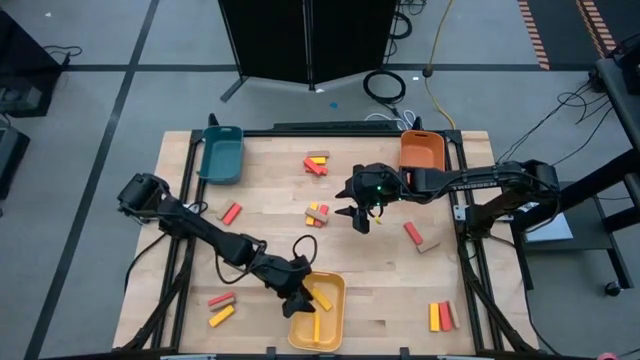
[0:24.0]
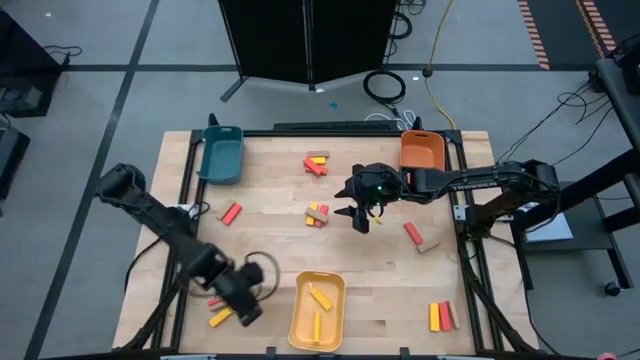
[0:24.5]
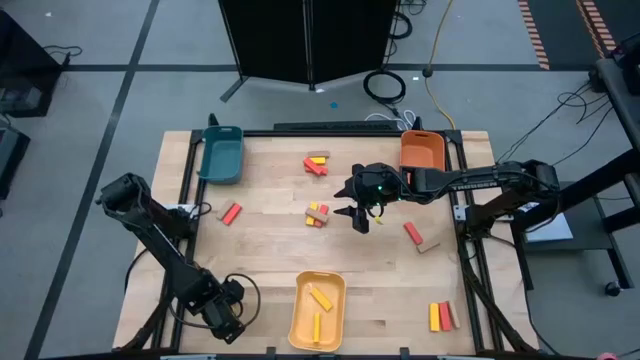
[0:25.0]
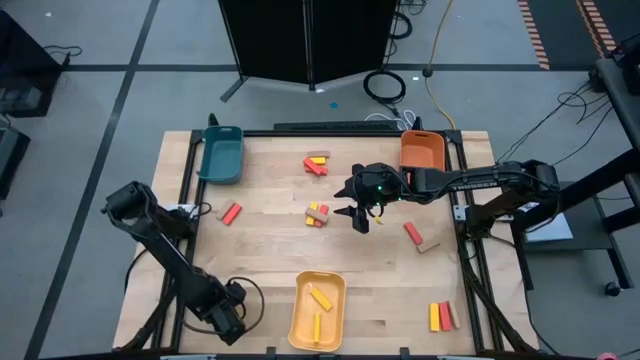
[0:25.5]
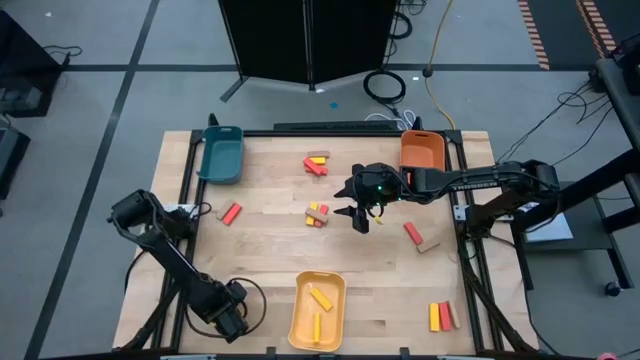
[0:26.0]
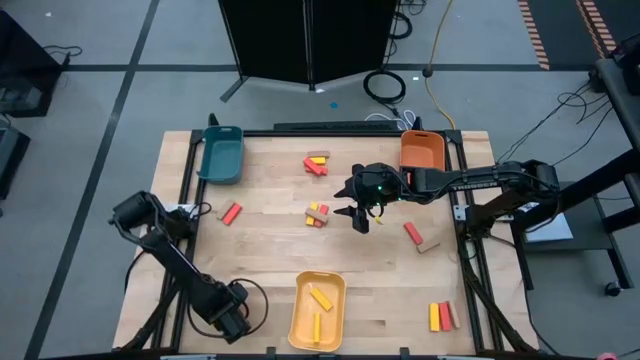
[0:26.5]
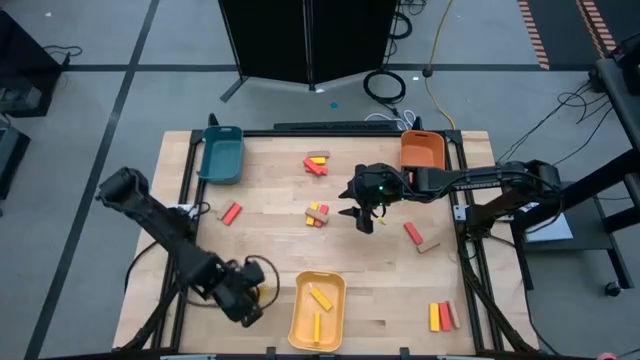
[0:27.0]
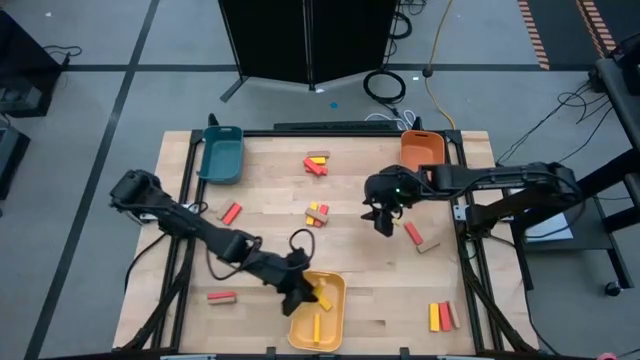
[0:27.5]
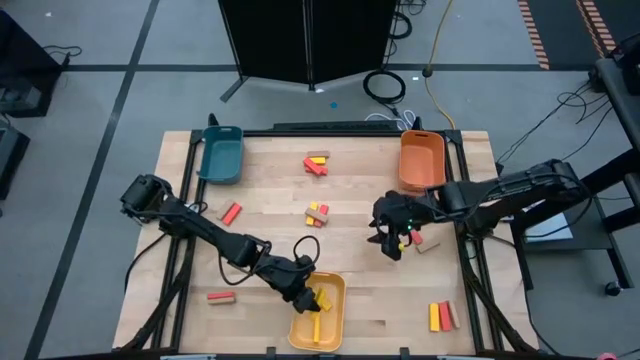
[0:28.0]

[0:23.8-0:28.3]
Task: Sort blocks
Put the yellow block into the yellow bin

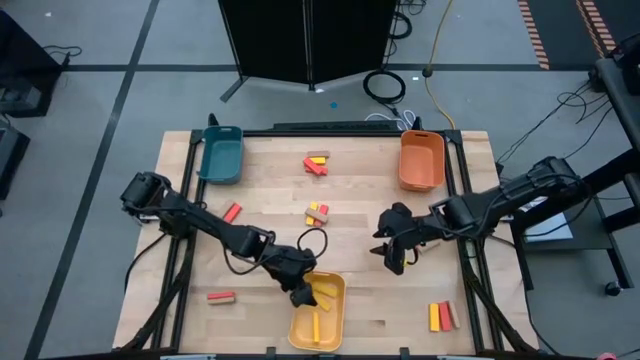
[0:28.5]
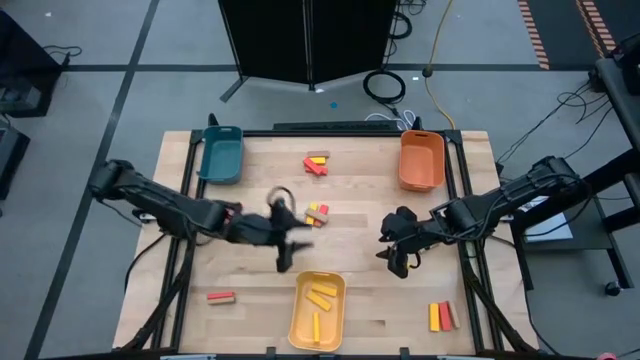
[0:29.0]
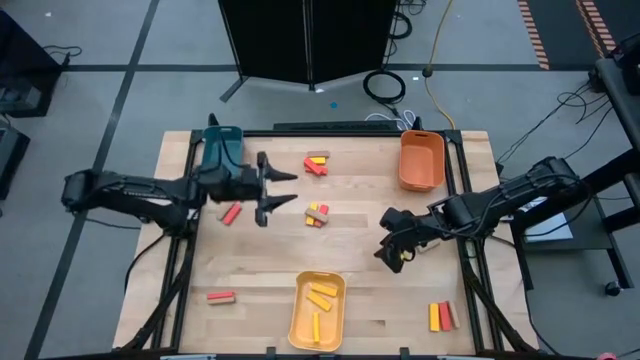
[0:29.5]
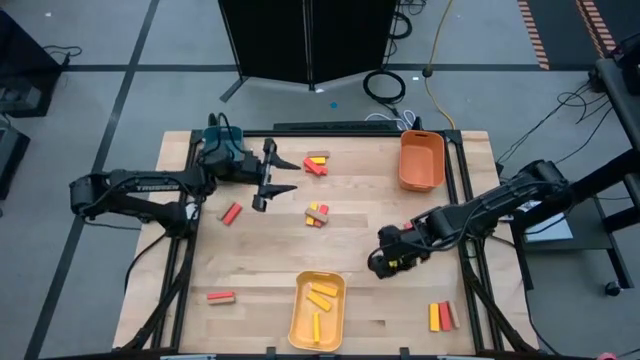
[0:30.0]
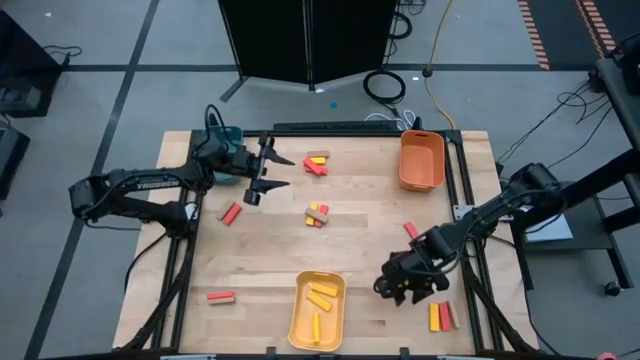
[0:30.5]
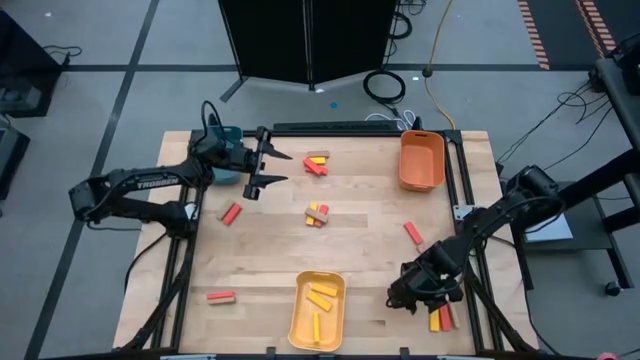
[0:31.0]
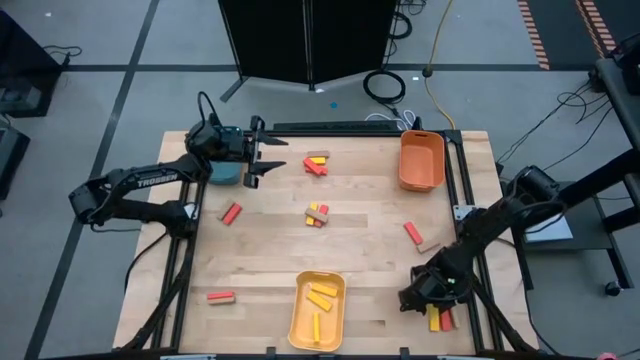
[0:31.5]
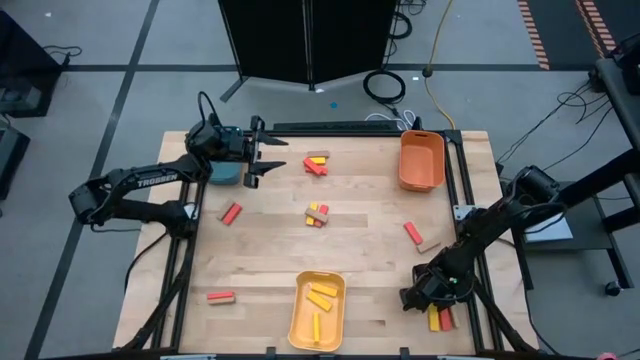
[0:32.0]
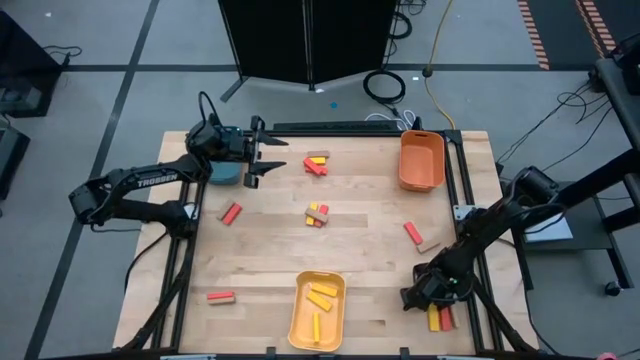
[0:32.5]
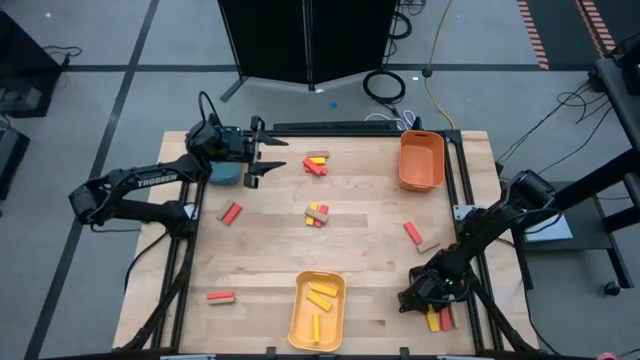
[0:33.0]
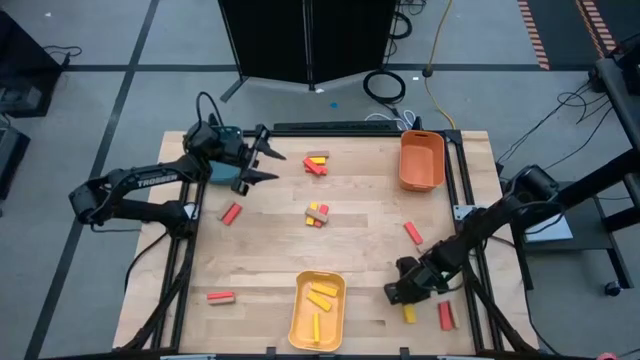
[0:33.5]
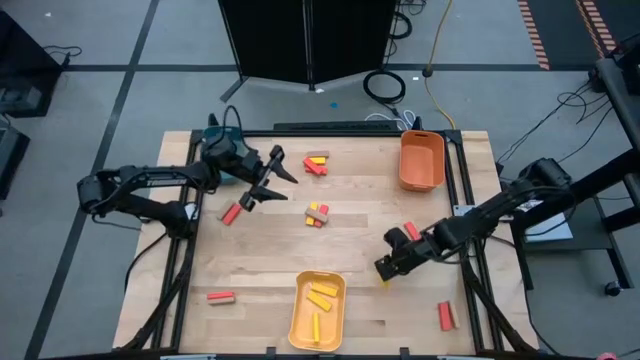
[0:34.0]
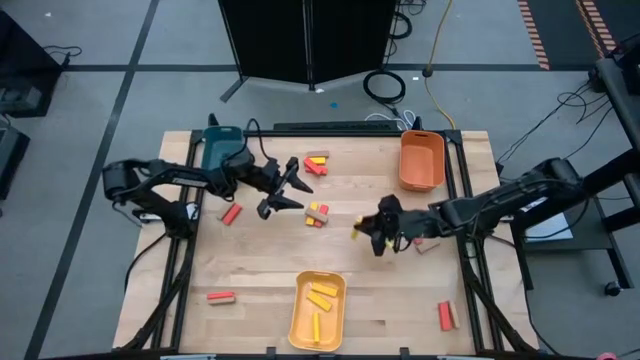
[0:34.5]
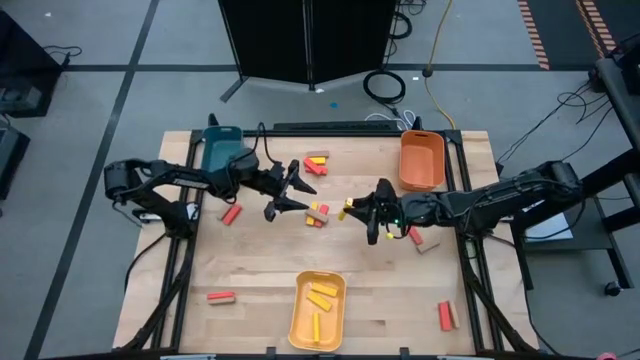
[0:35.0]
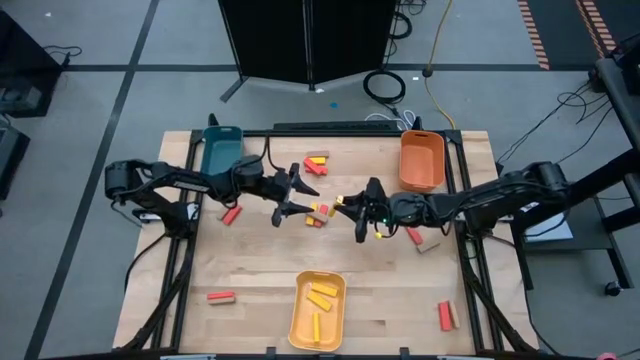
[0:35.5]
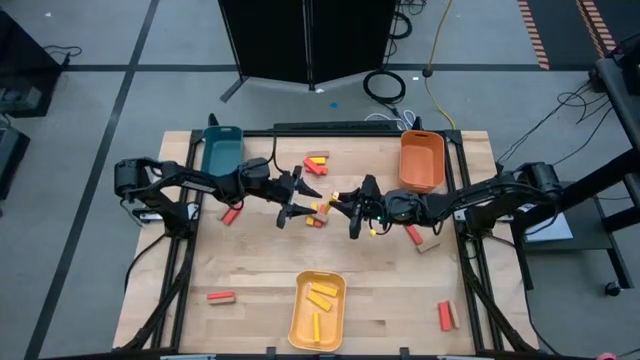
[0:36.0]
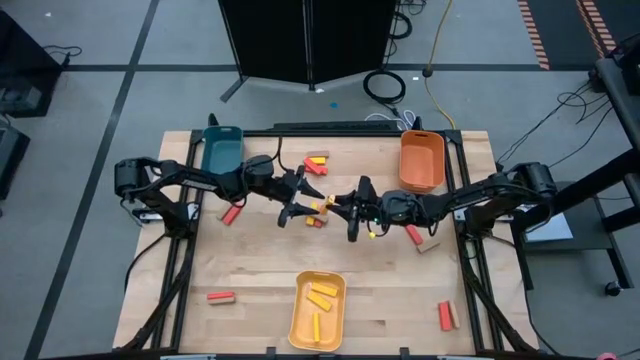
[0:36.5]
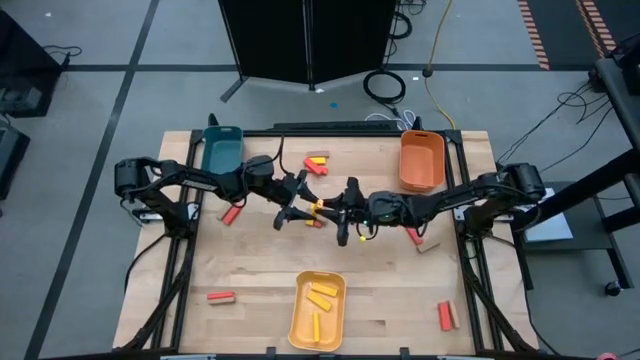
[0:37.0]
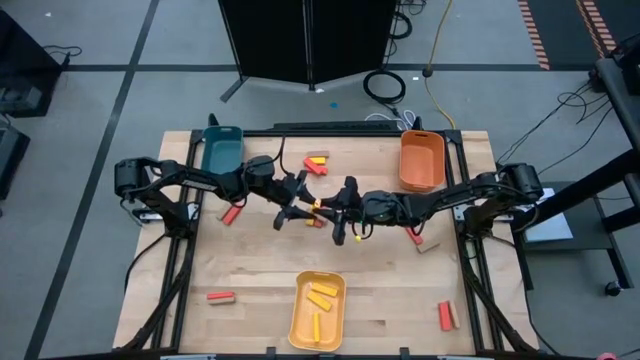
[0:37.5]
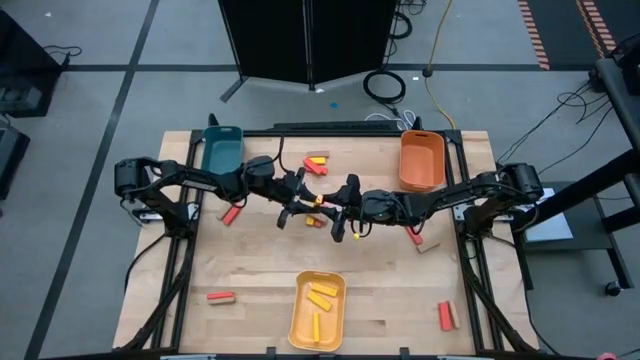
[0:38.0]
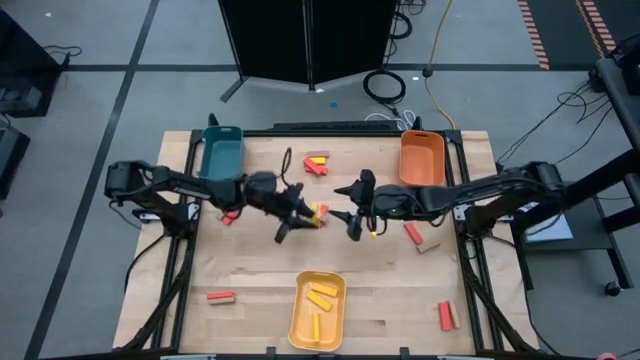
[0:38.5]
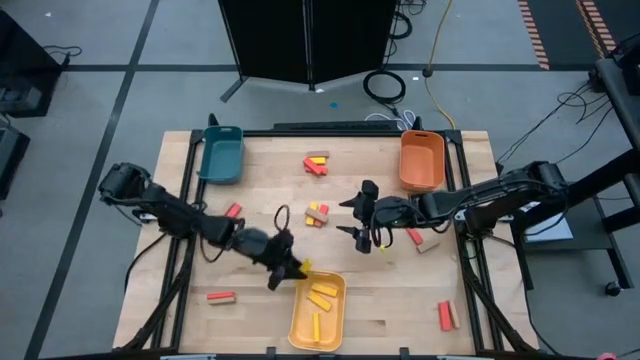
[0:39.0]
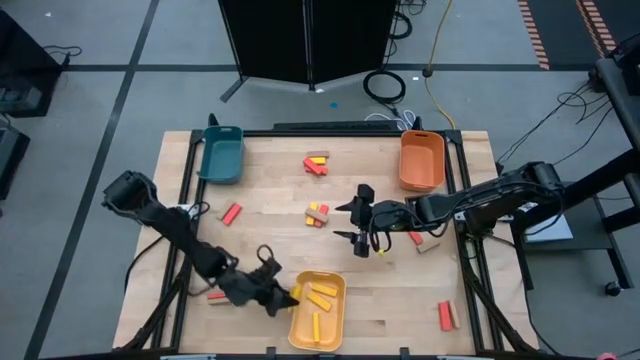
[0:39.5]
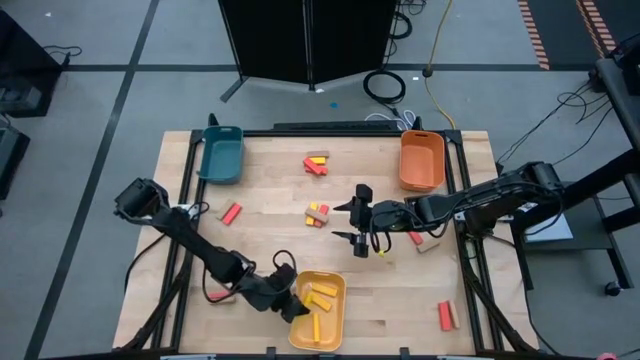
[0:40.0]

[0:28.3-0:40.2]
Put the yellow block into the yellow bin

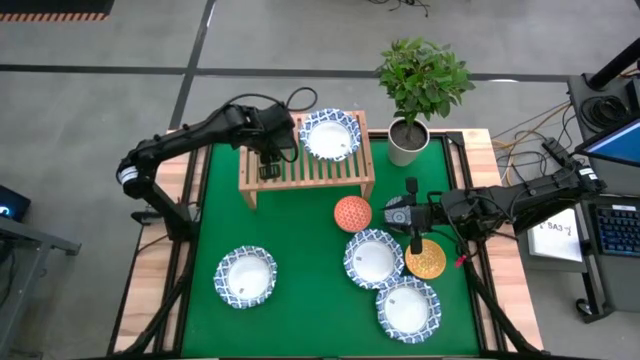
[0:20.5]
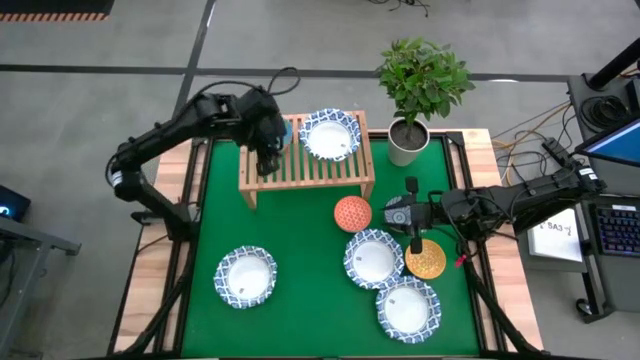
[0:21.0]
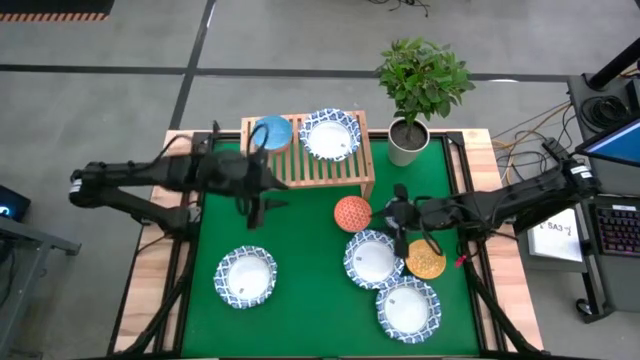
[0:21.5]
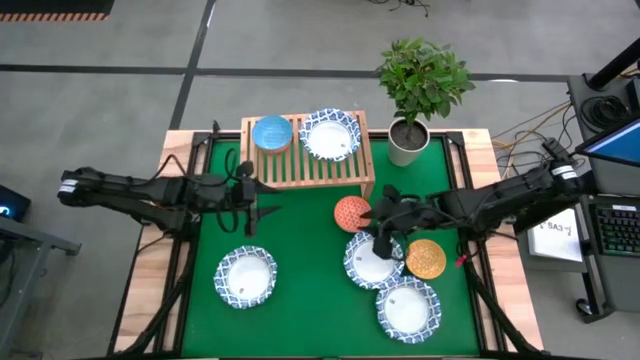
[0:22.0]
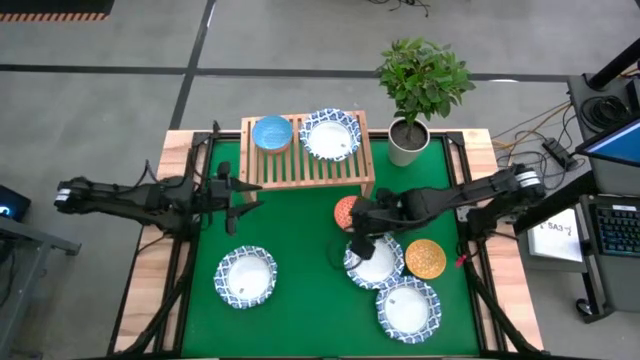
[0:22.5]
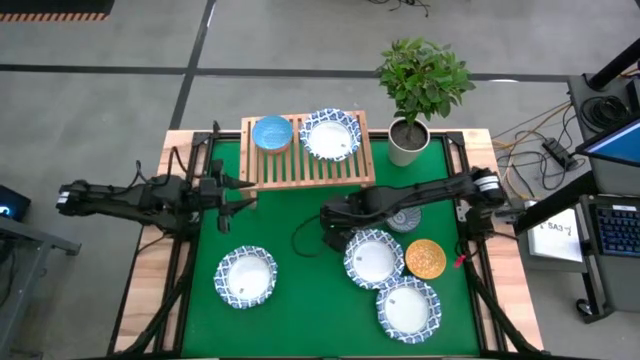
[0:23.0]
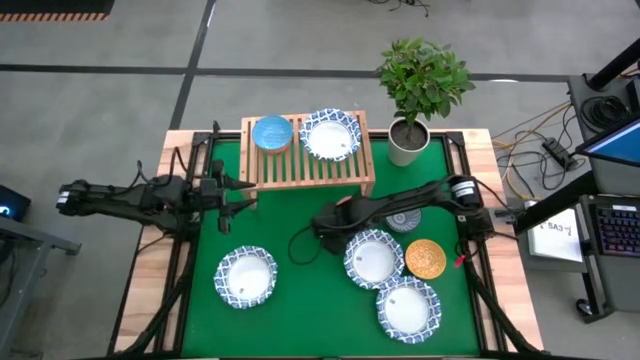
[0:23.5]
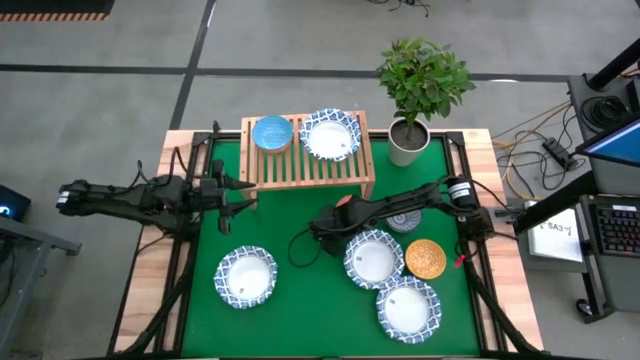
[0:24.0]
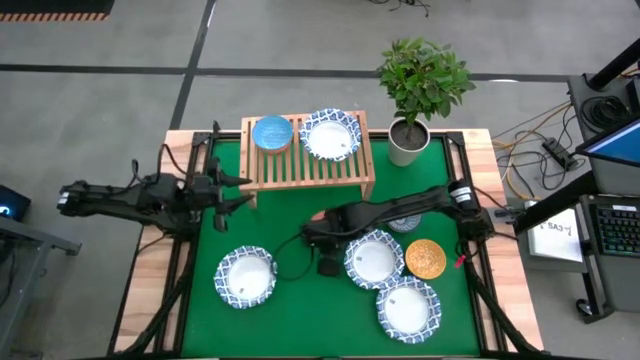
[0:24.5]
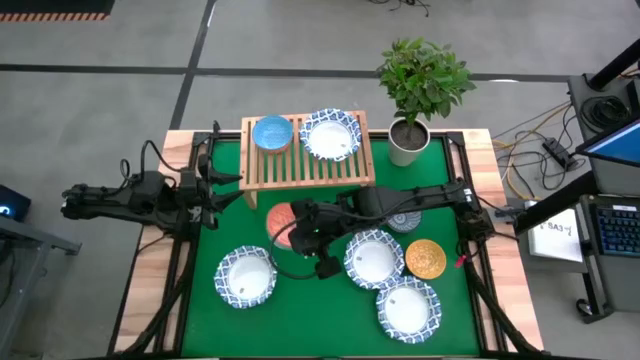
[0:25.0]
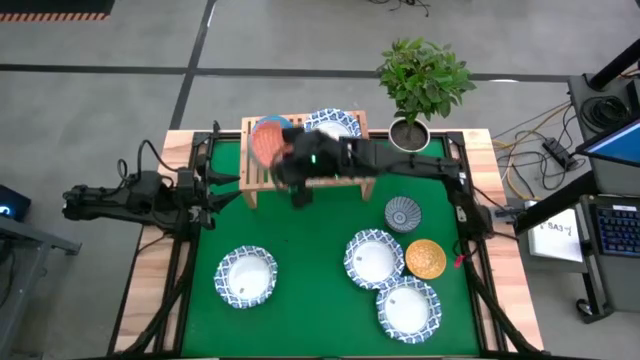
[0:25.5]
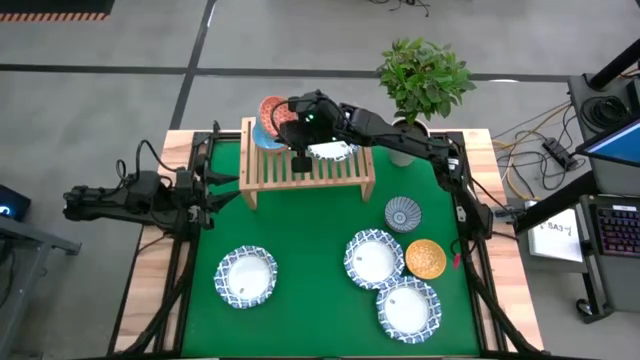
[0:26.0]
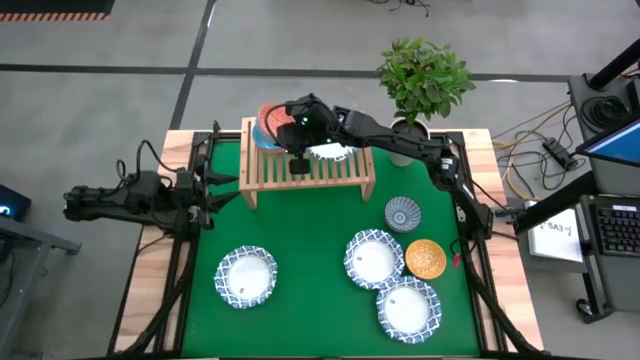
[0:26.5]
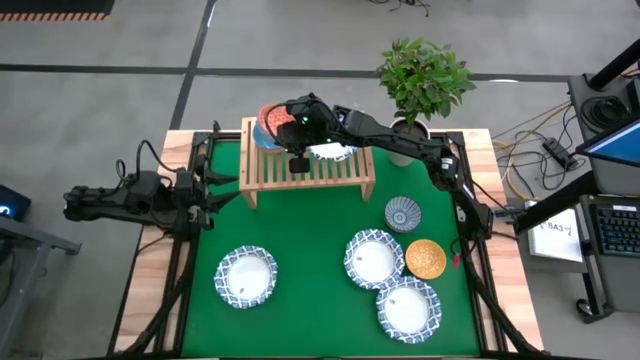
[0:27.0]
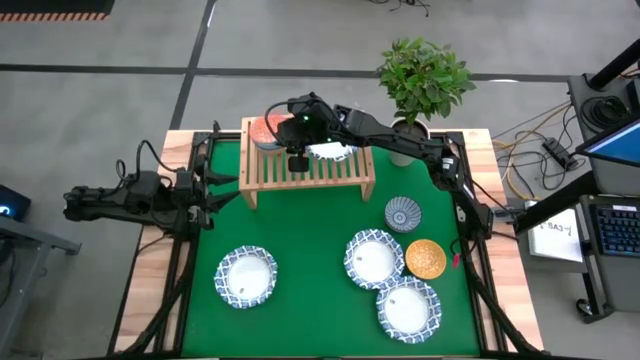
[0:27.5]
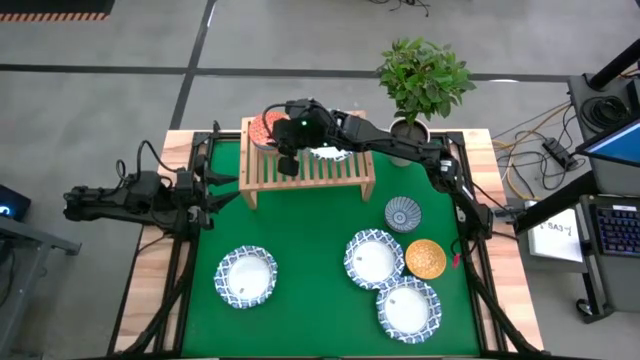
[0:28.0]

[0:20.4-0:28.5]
Task: Place and stack bowls onto a shelf
Stack the orange bowl on top of the blue bowl on the shelf
